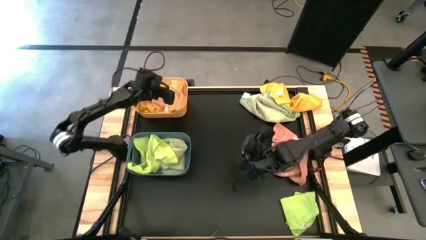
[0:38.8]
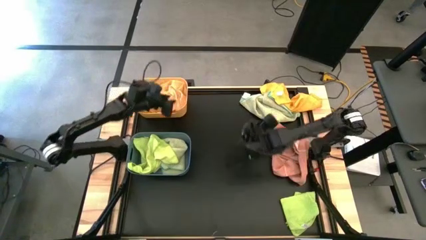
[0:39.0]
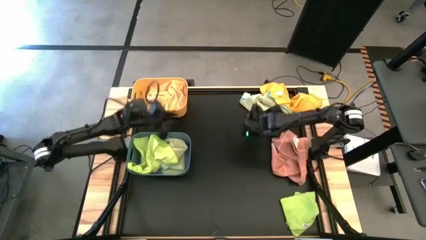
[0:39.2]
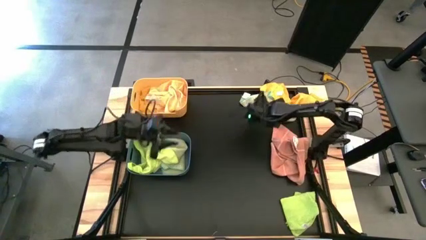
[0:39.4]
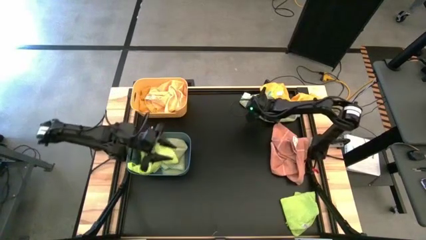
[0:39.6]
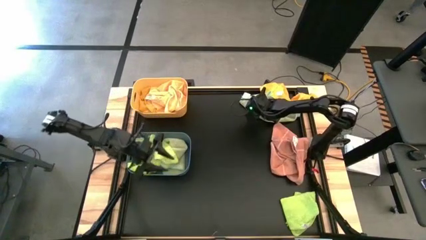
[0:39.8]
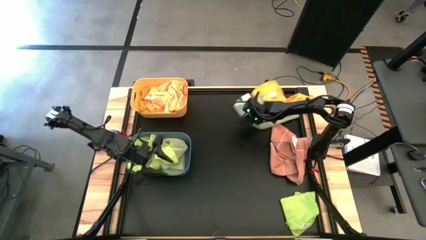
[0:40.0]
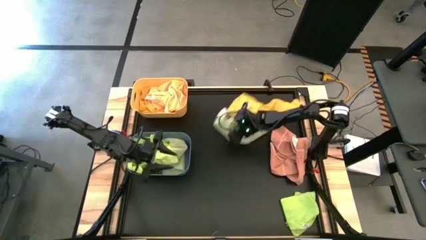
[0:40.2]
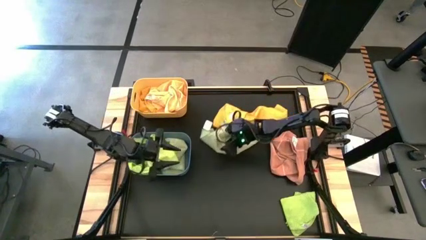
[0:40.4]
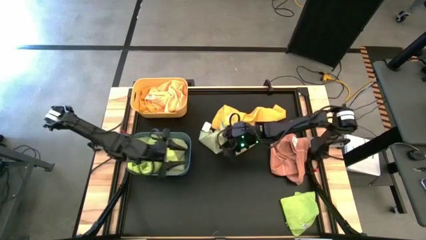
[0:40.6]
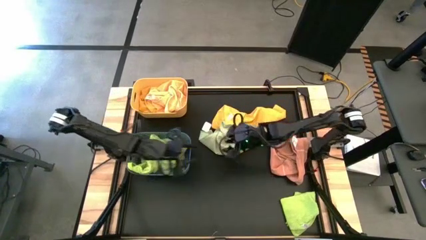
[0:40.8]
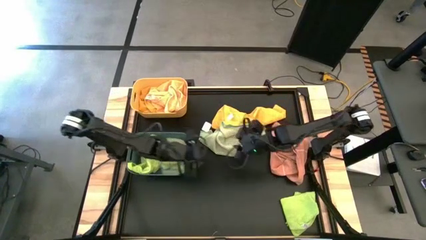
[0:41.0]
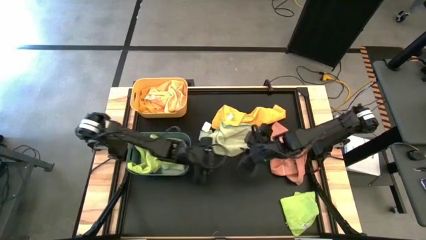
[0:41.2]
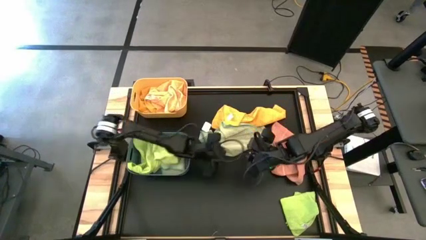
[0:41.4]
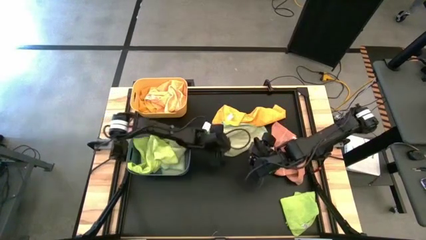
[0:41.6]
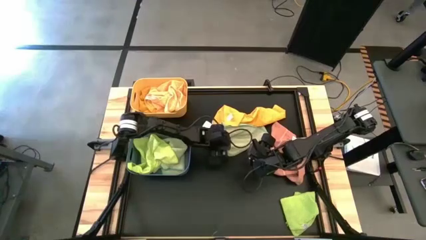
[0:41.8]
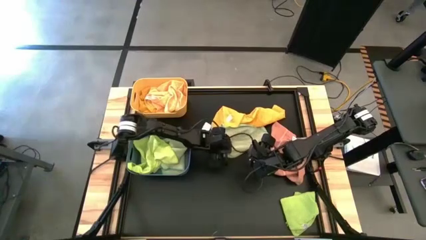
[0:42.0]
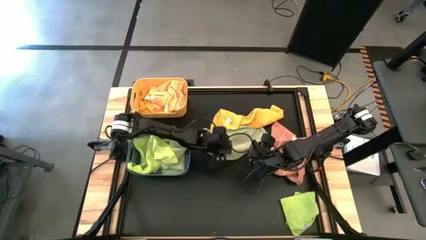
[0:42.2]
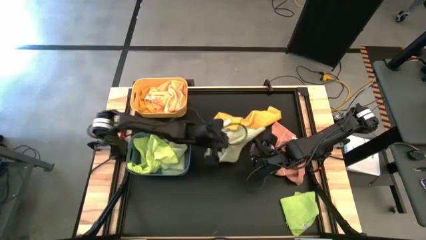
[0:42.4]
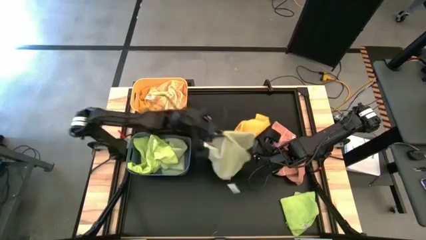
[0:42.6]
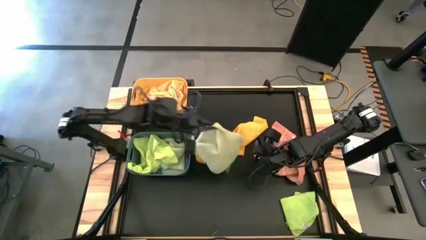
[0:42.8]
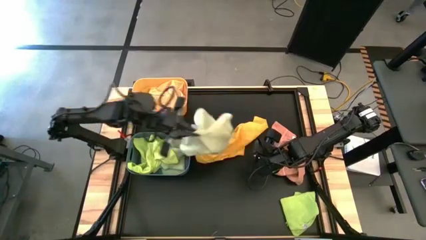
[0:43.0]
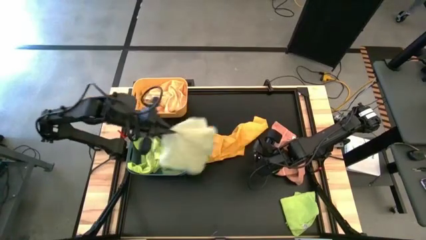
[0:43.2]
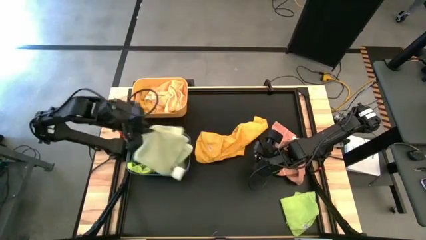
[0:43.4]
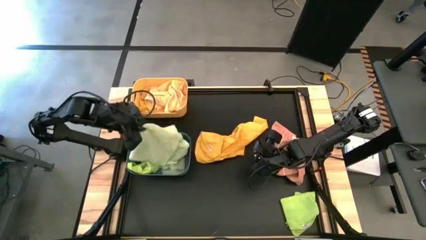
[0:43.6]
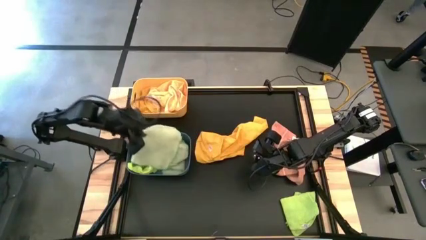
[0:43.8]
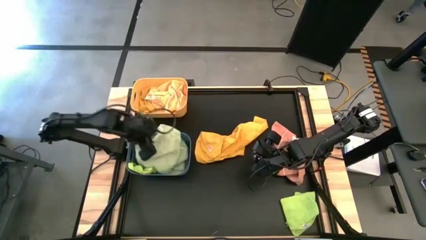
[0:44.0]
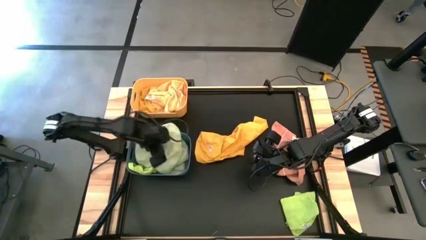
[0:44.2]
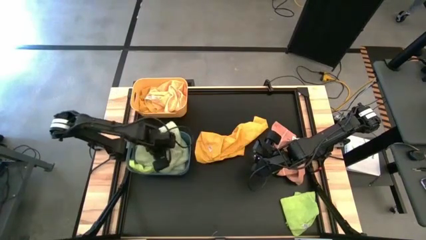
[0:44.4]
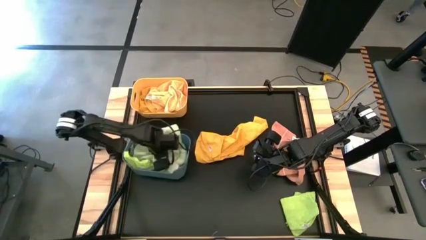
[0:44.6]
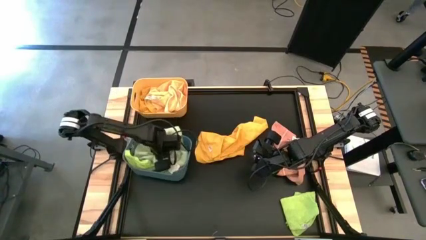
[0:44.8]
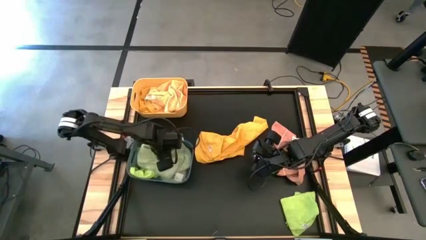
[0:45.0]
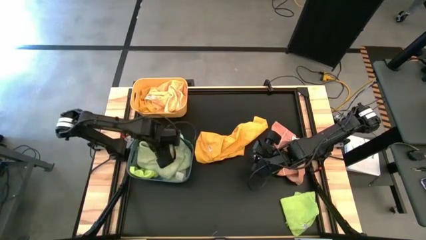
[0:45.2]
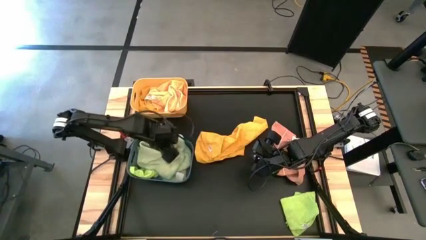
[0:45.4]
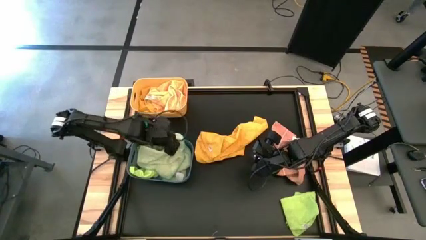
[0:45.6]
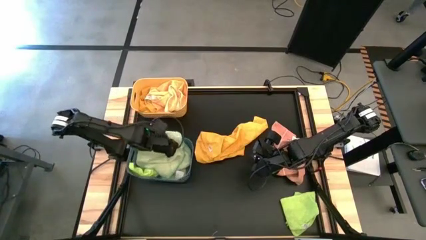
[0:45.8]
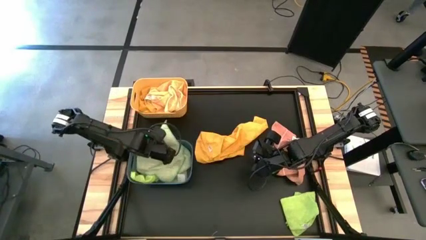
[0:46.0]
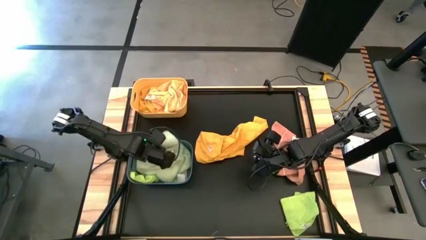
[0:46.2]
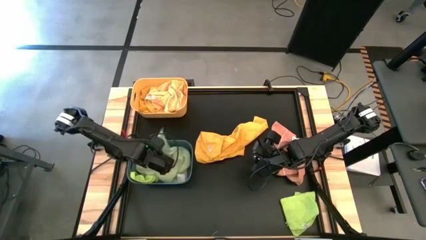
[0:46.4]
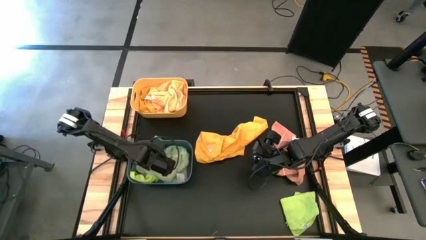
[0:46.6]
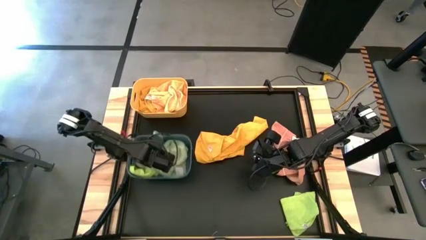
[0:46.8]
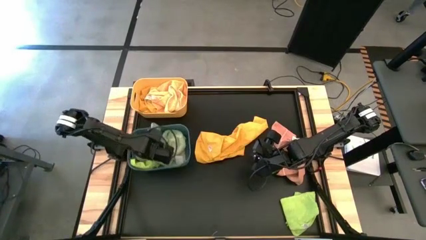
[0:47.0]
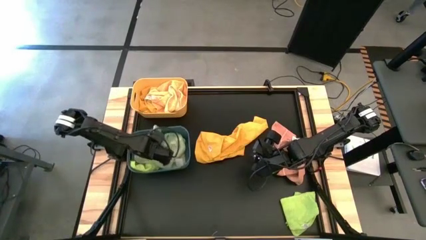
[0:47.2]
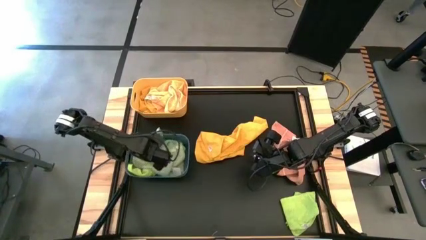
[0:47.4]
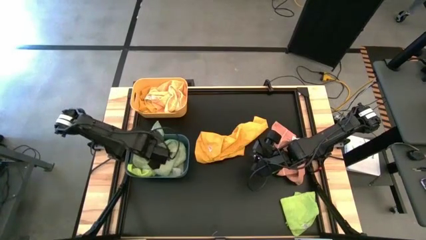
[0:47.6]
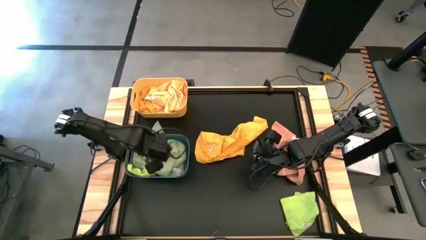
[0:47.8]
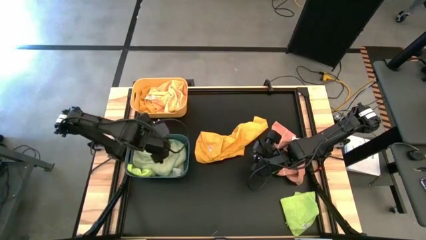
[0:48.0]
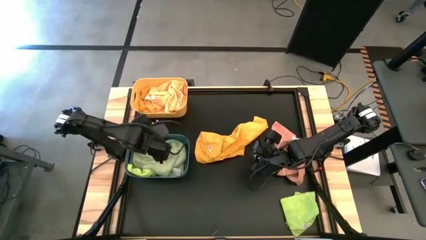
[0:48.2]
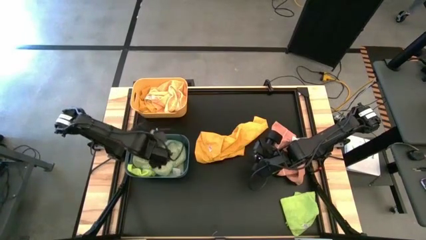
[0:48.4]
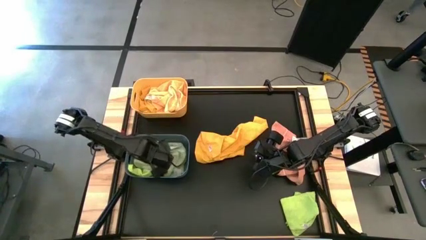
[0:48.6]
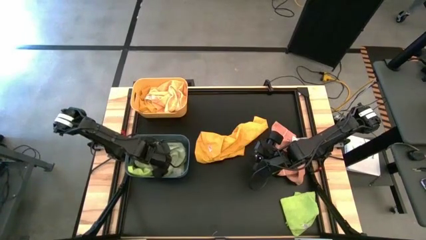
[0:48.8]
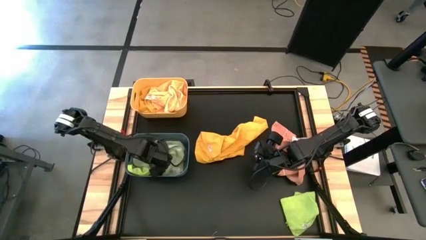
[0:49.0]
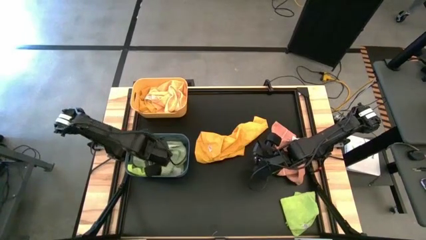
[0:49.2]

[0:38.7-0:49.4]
Task: Sort microfiber towel by color & place in baskets
Put the light green microfiber towel into the blue bin

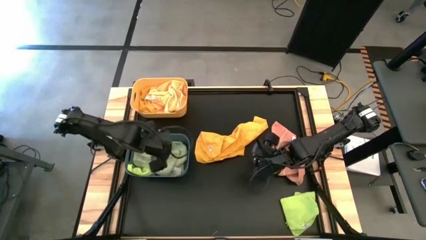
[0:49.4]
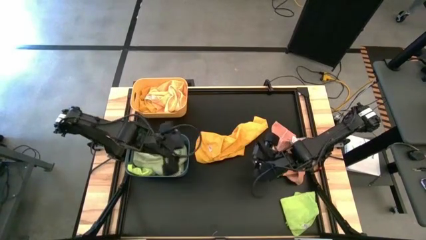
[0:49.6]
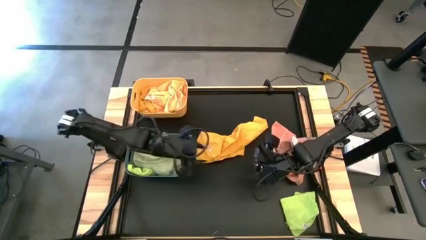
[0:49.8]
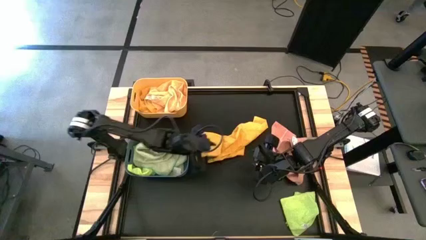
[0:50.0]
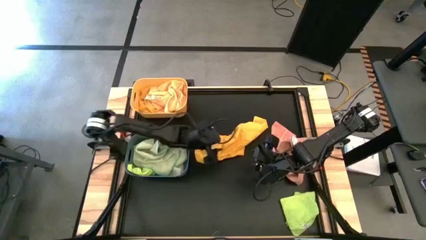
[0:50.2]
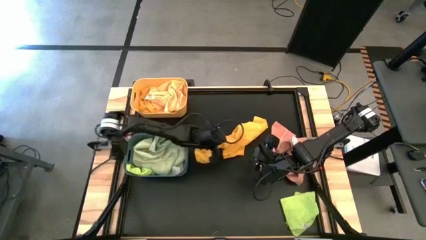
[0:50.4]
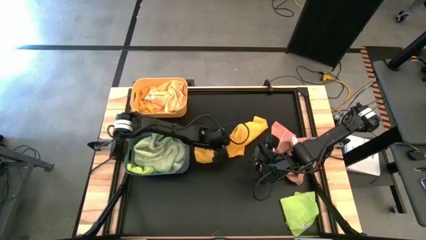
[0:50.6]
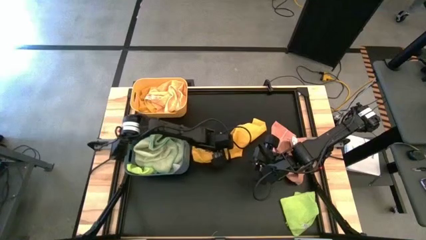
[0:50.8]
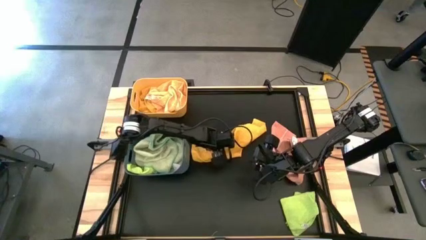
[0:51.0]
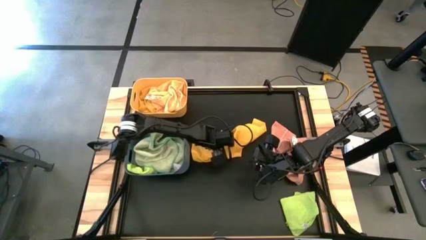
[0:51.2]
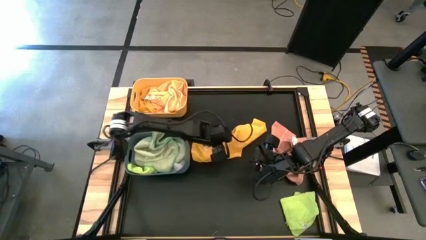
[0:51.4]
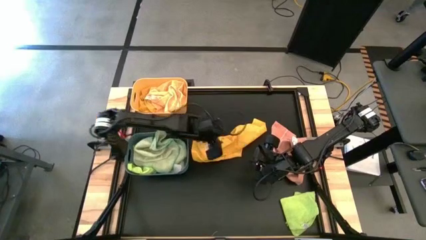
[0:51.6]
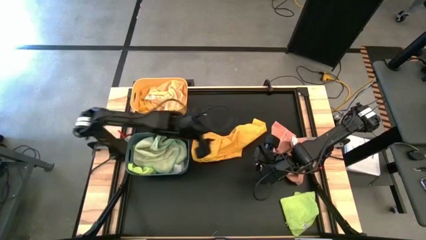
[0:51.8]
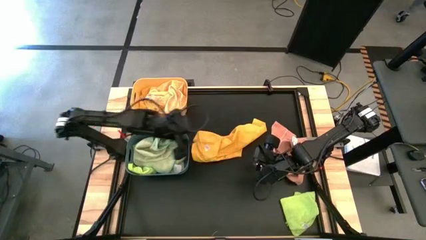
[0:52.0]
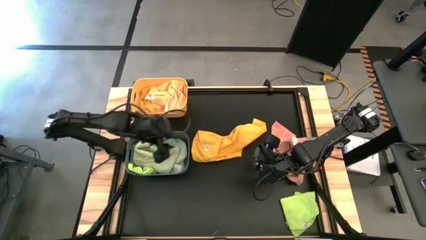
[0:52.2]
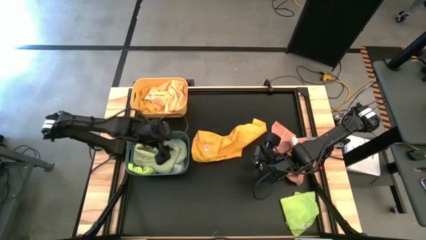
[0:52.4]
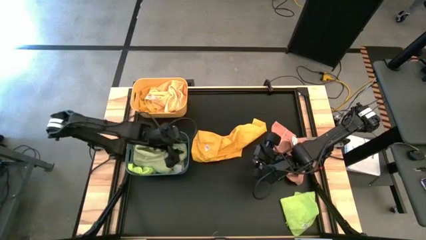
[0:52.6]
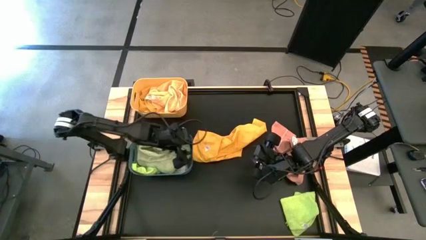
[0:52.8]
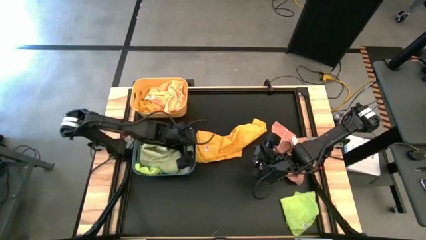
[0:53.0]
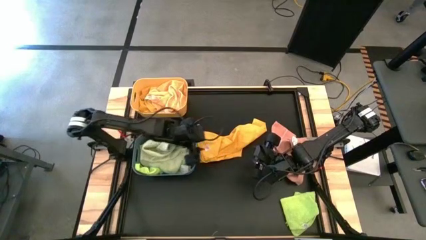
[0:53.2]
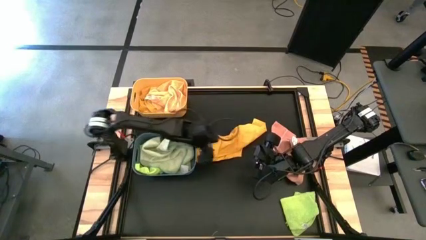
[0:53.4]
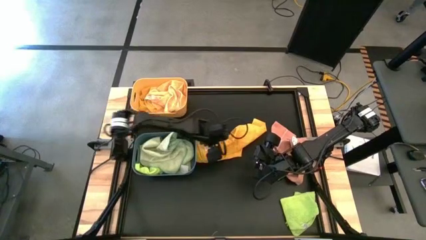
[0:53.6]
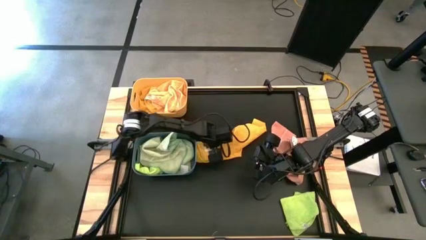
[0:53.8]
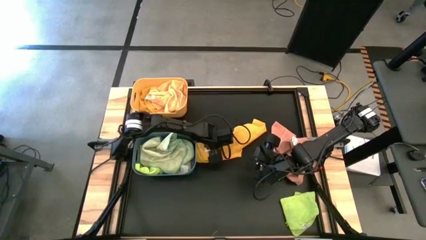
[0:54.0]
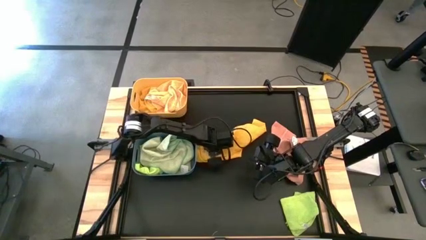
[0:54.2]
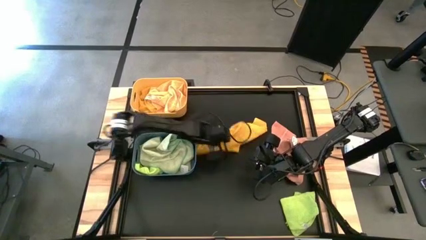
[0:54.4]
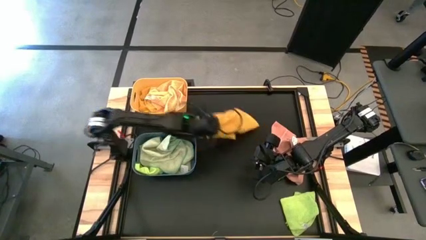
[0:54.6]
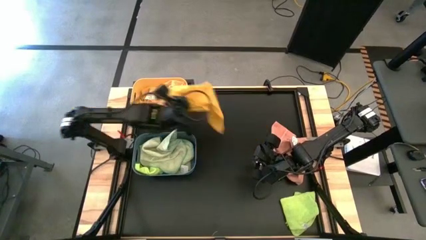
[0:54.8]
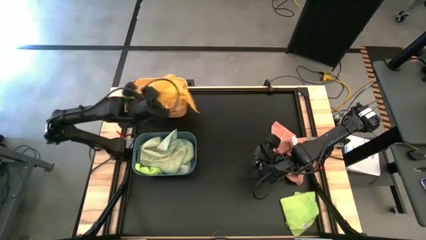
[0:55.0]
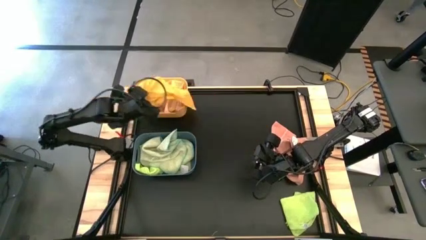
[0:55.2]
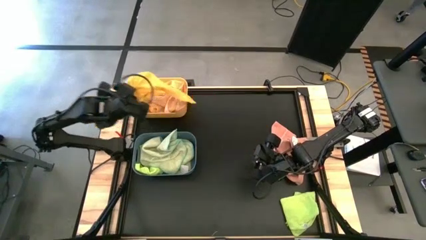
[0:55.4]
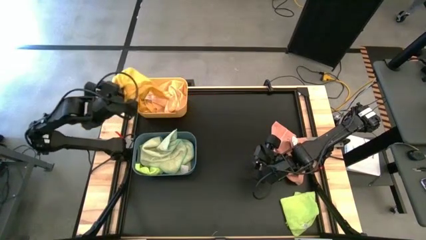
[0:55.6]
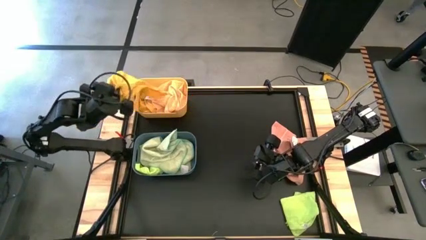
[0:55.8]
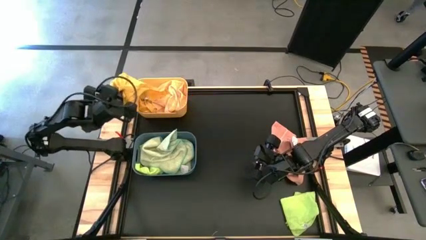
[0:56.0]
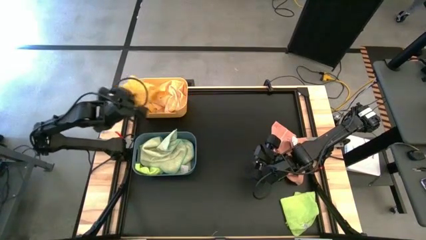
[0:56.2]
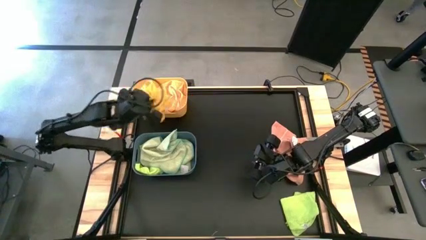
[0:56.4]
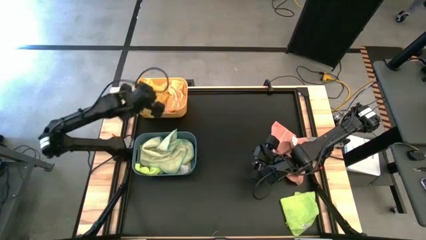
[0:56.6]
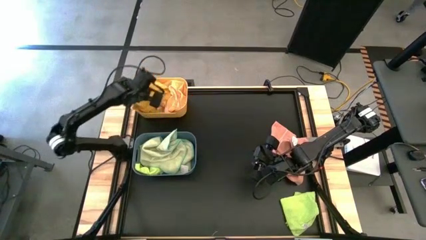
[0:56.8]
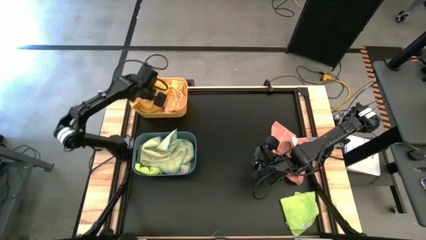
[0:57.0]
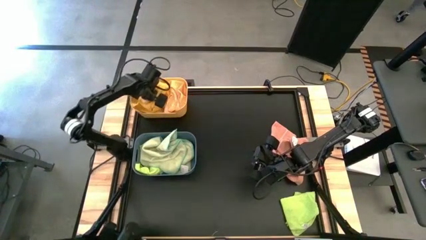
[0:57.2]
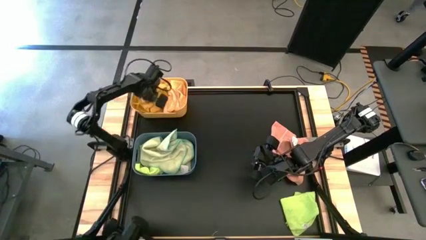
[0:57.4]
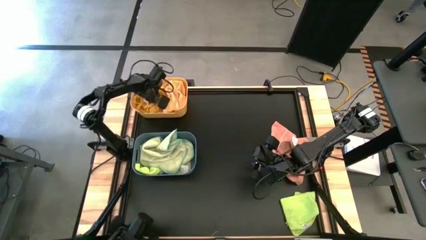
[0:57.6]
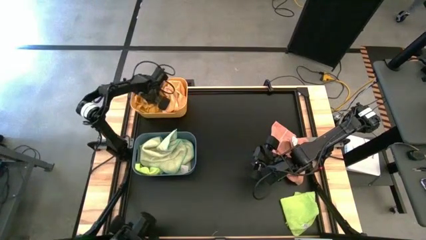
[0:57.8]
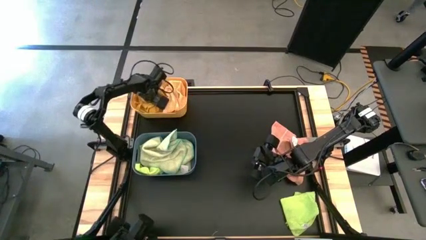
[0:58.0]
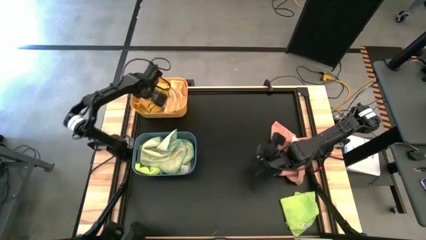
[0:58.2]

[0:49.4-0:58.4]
Put the yellow towel into the yellow bin
